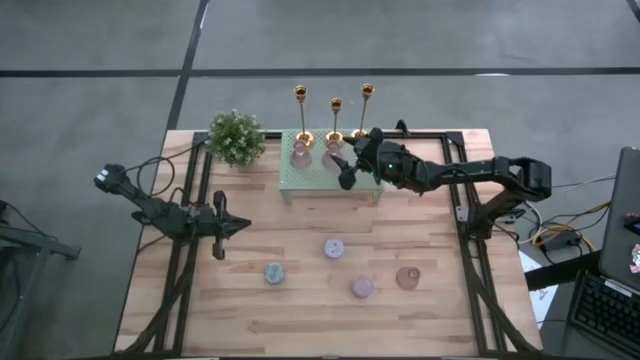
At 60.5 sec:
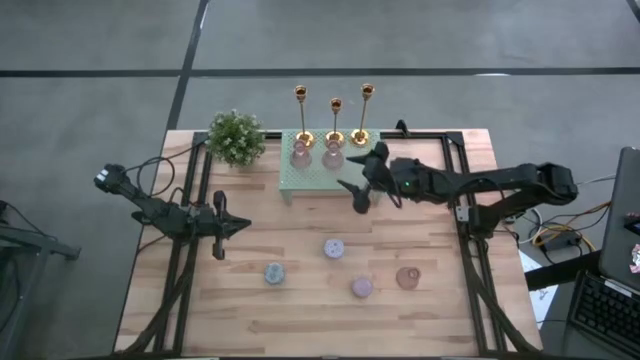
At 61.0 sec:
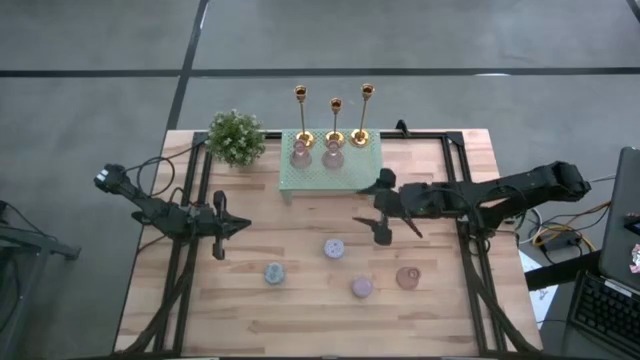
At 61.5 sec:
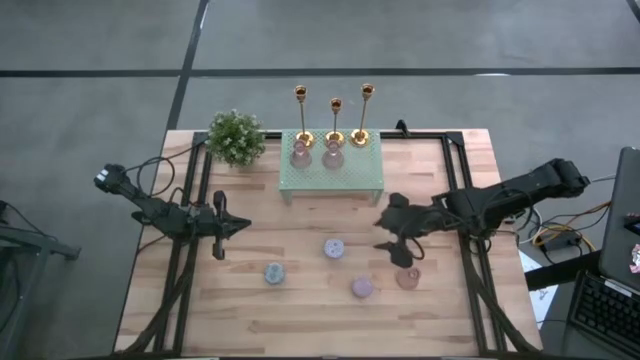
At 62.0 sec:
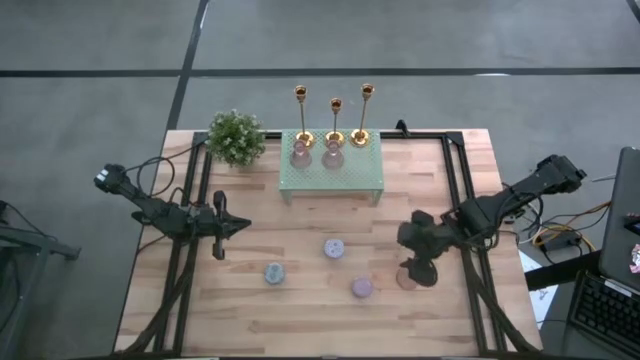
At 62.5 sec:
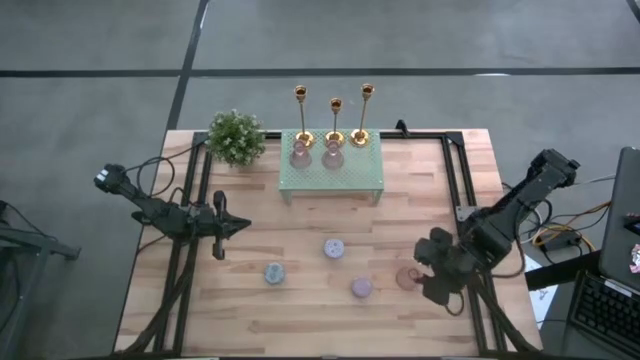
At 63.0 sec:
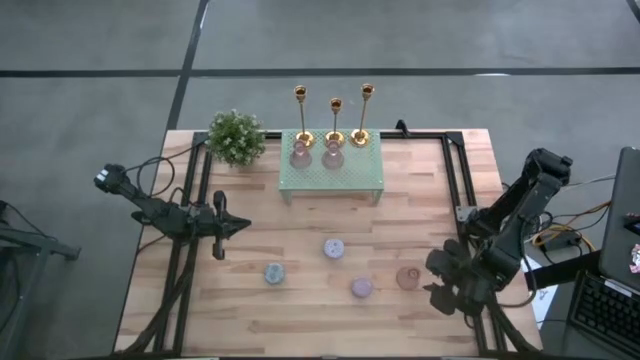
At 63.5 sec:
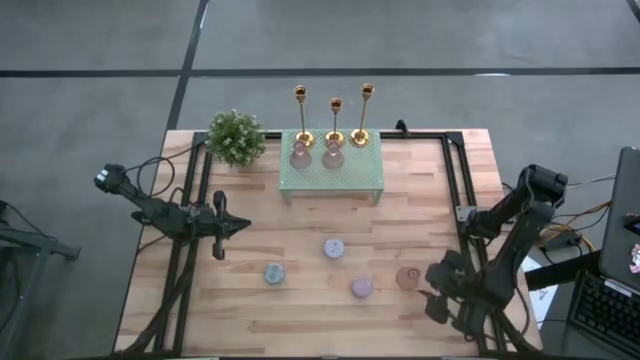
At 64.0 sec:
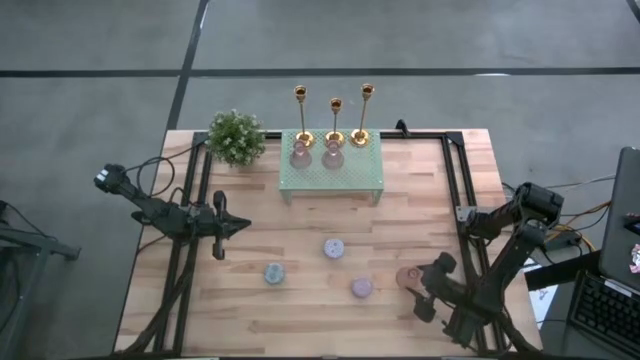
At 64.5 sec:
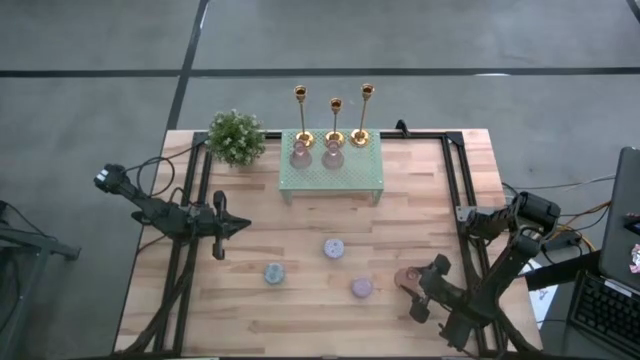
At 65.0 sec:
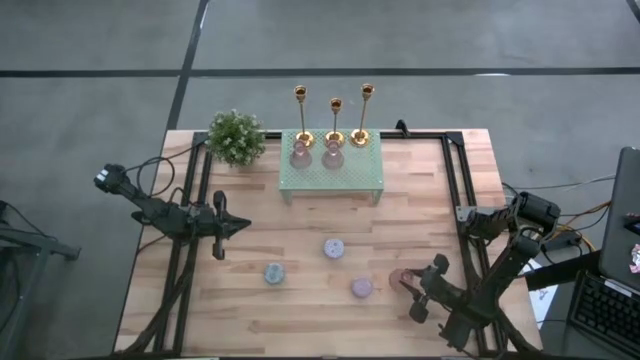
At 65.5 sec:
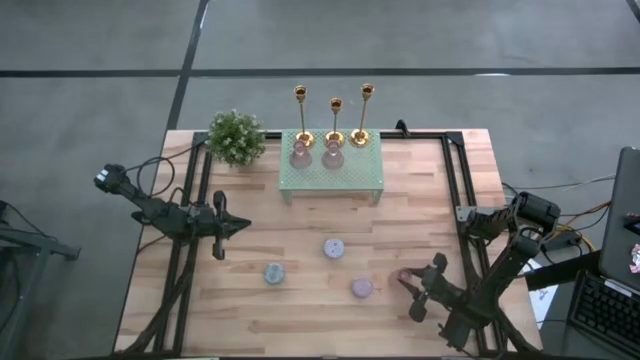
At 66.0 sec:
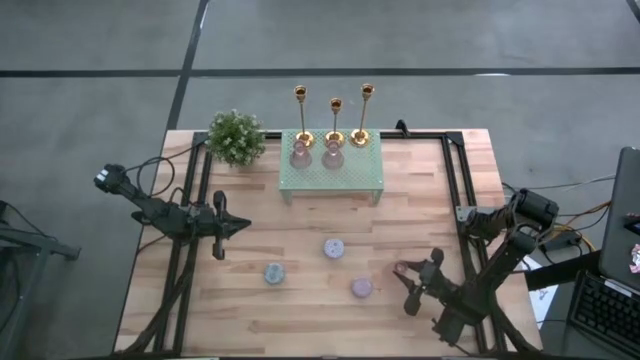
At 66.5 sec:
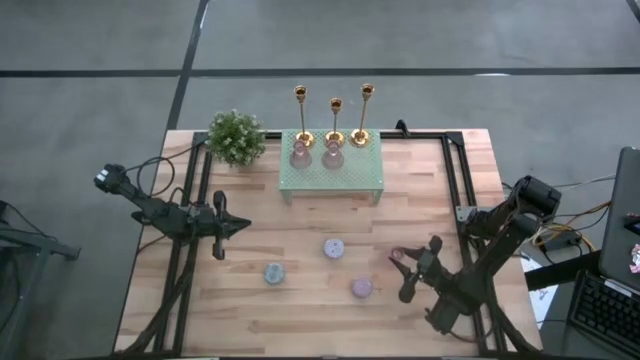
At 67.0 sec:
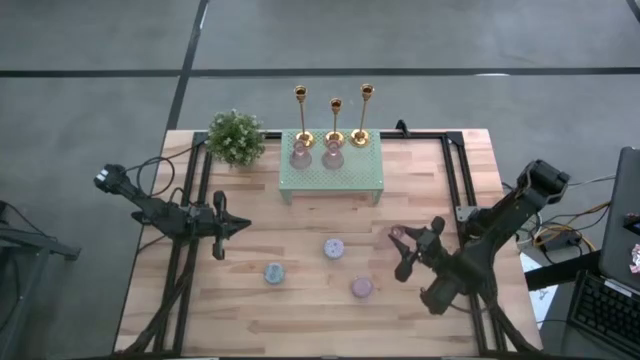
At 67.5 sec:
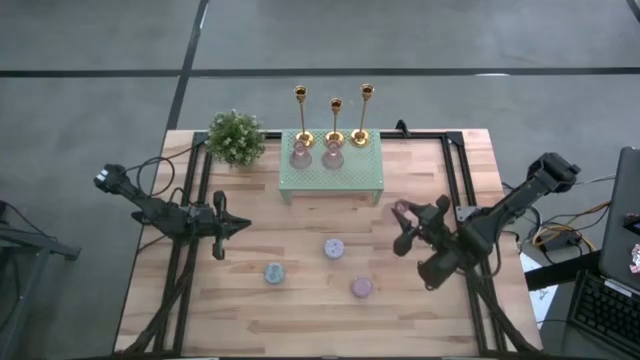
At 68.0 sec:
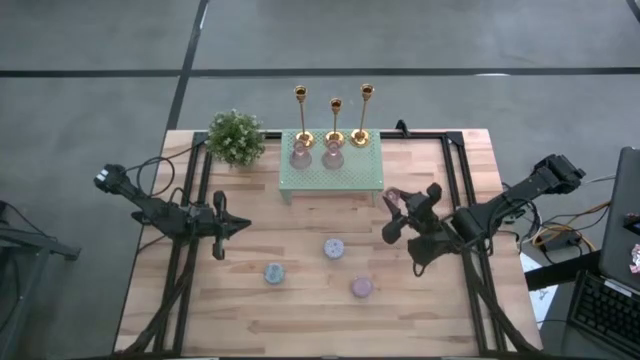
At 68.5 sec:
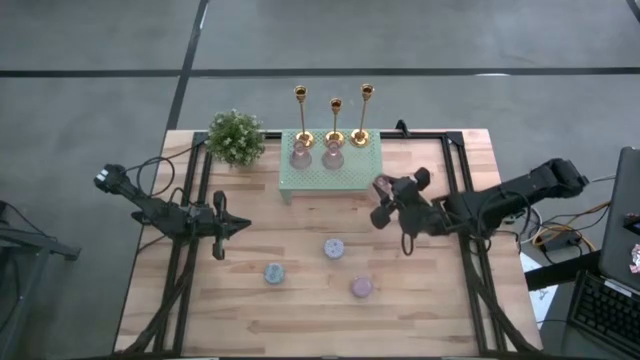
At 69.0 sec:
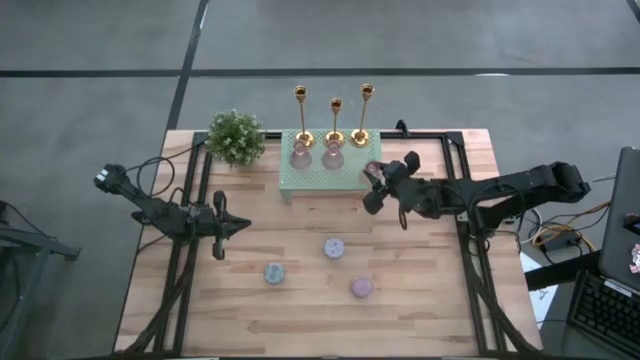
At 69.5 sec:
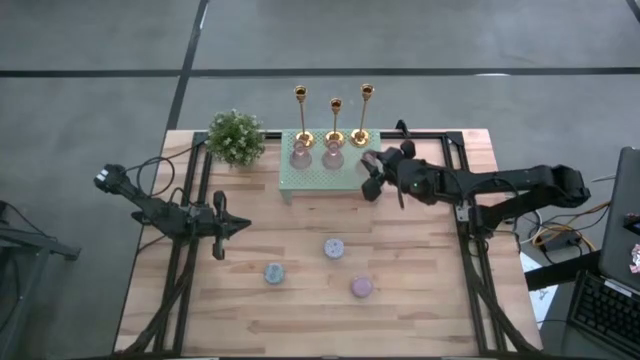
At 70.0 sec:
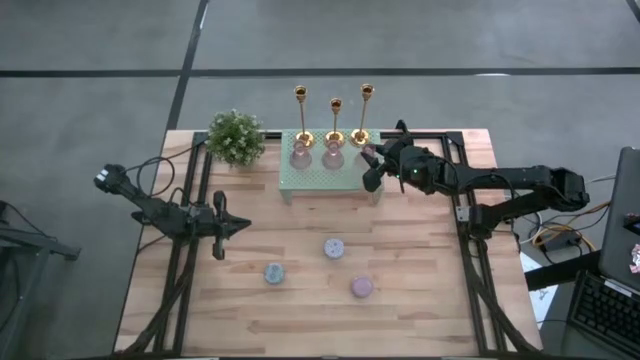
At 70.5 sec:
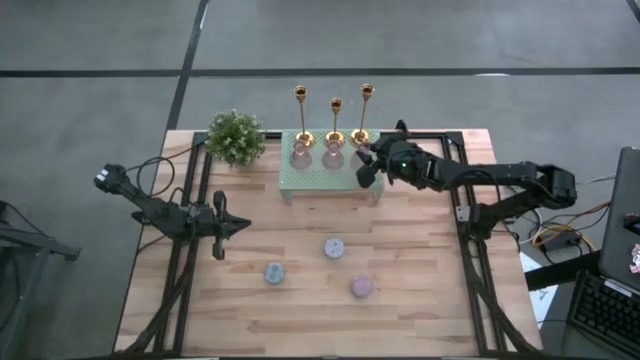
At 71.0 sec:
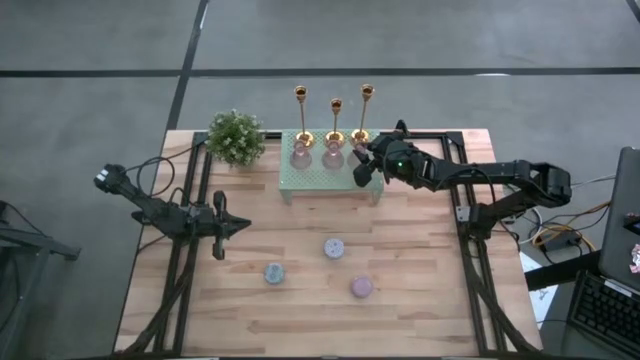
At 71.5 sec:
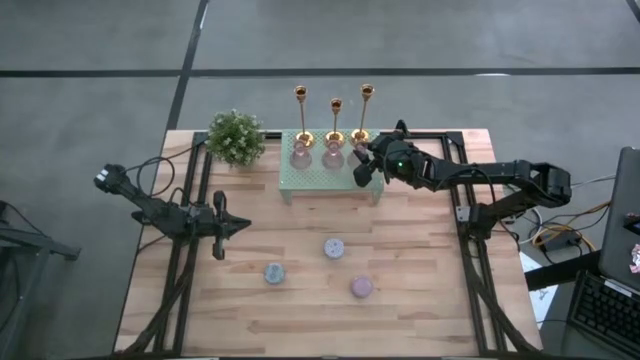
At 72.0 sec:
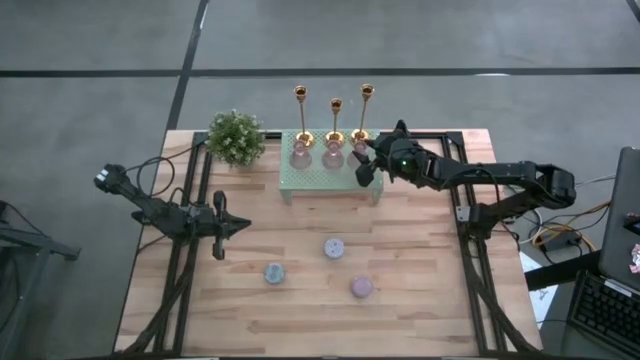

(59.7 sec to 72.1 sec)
Task: Stock candles and vases on shelf
Align the pink glass with the other pink glass vases on the shelf

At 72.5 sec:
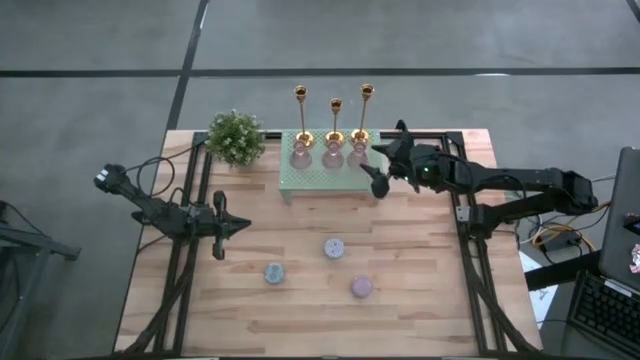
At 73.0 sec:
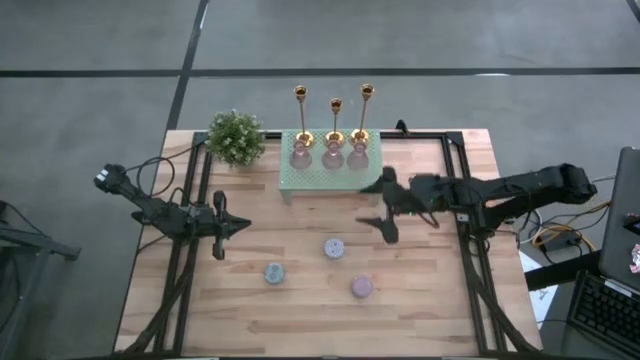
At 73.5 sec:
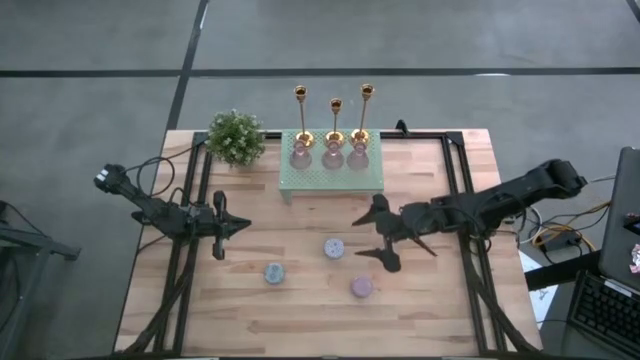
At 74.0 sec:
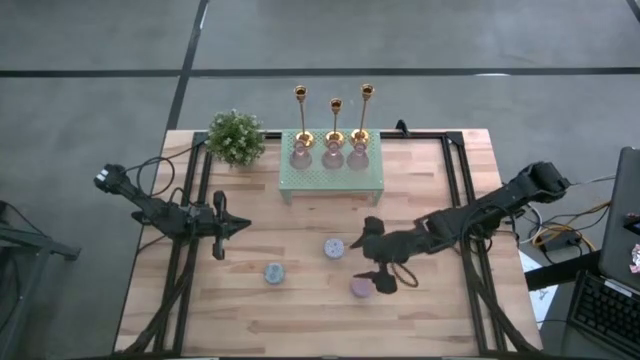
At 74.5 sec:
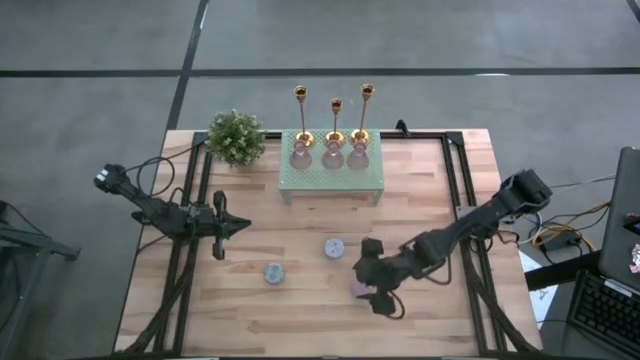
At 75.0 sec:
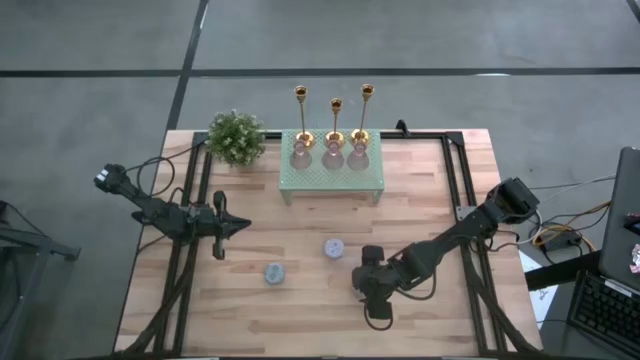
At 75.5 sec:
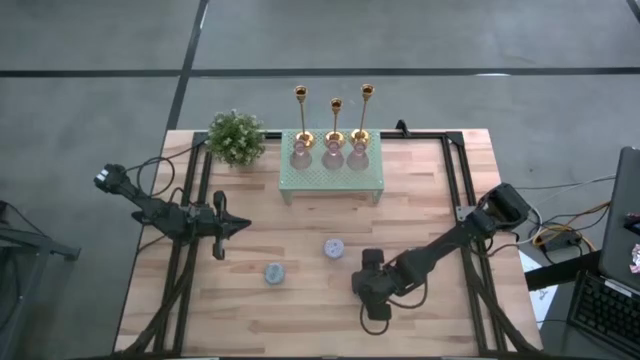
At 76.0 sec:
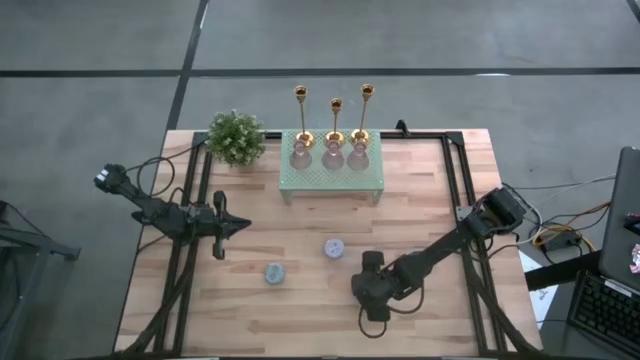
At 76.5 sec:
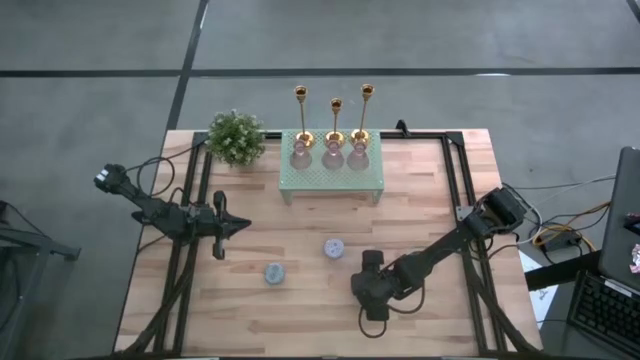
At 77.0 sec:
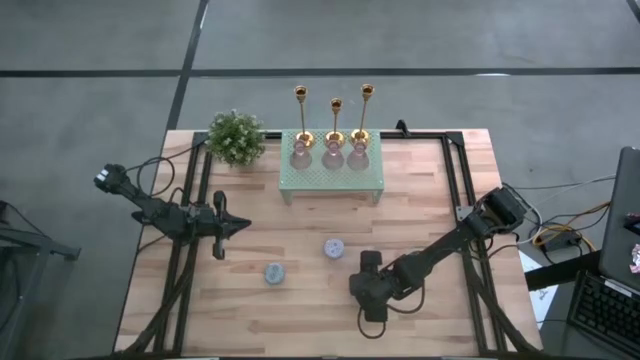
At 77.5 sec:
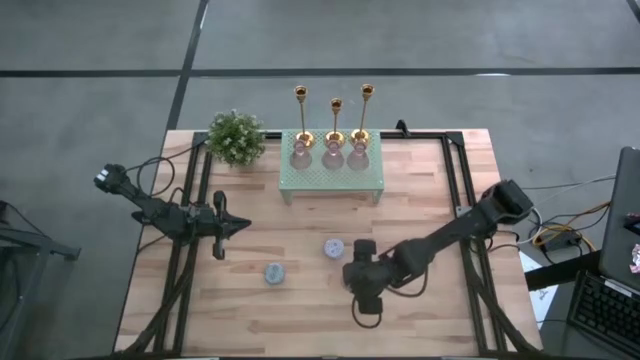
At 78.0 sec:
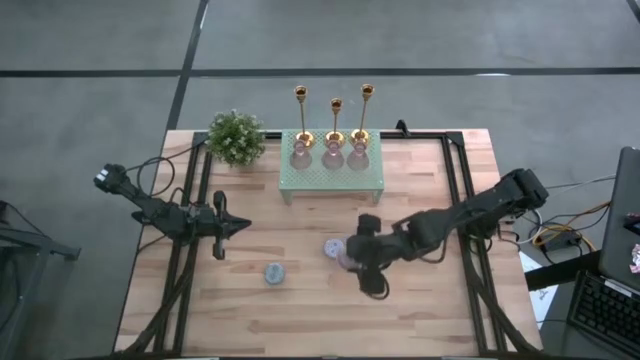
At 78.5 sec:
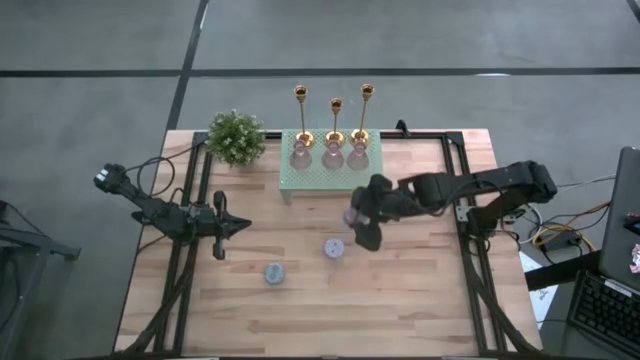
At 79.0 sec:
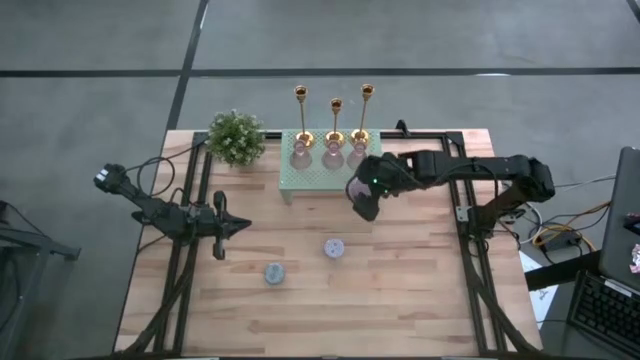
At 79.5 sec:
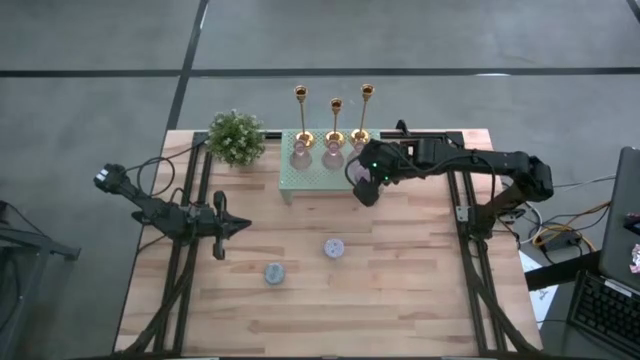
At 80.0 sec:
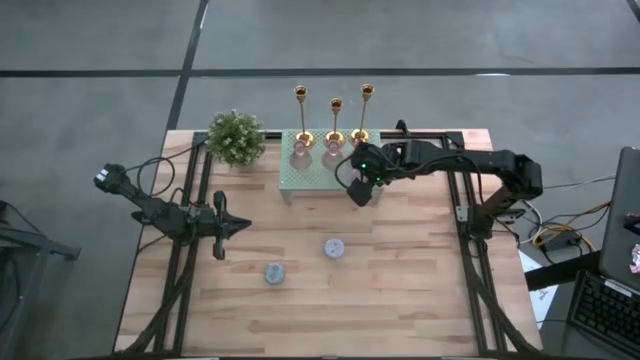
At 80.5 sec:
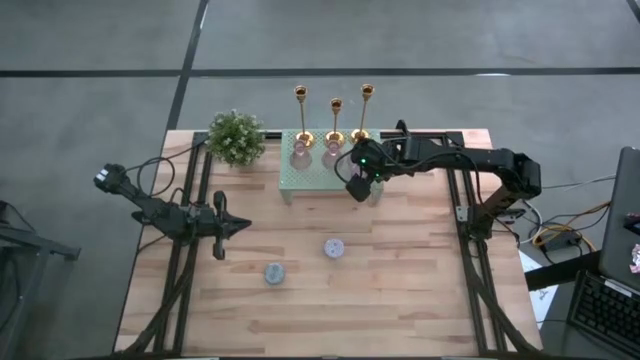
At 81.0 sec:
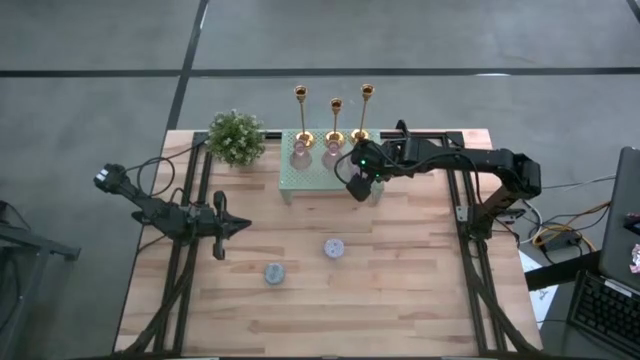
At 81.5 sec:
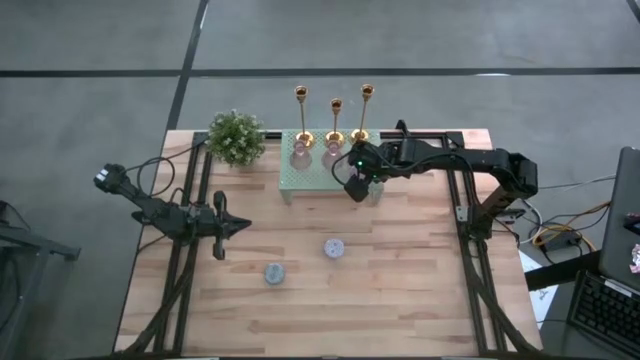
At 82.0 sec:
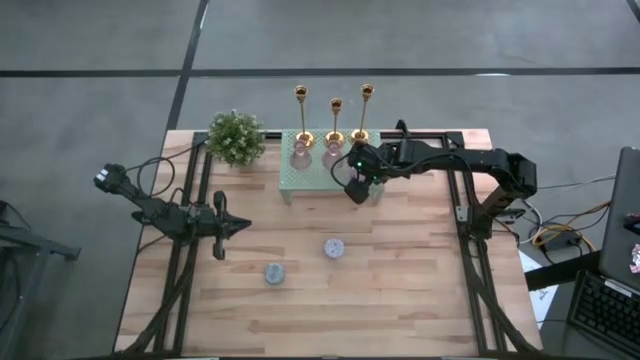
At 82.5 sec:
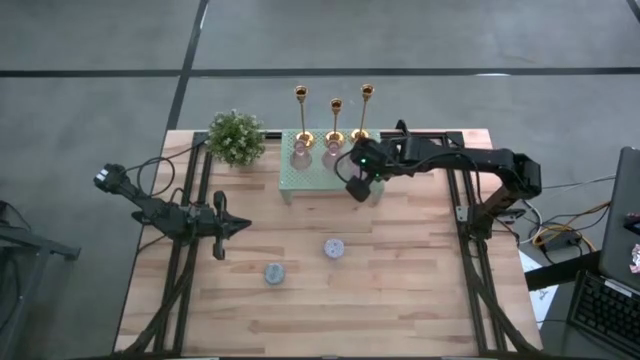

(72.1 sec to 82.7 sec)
Put the pink patterned scented candle on the shelf
